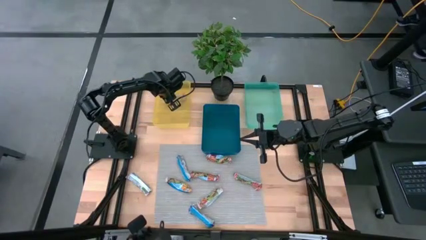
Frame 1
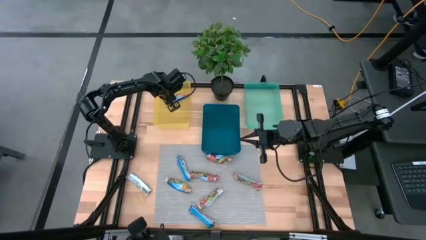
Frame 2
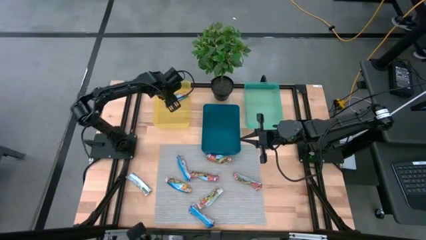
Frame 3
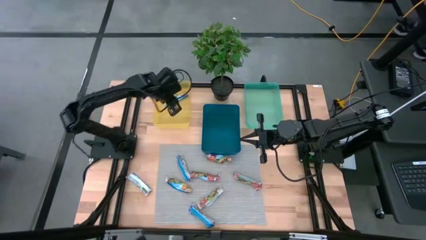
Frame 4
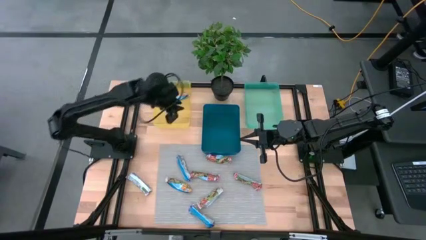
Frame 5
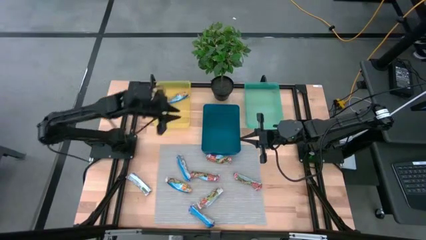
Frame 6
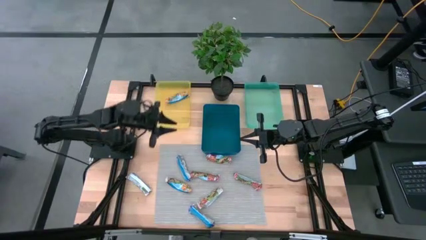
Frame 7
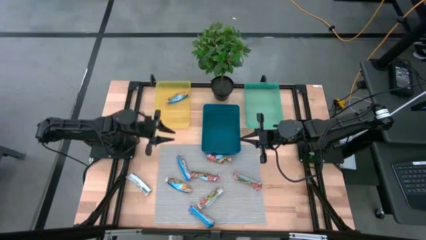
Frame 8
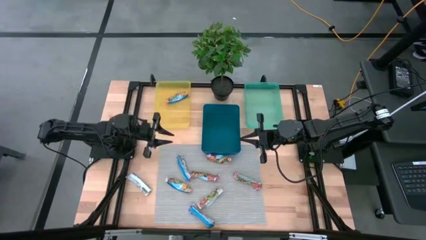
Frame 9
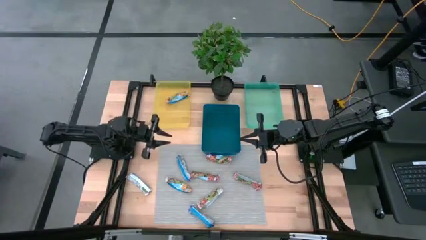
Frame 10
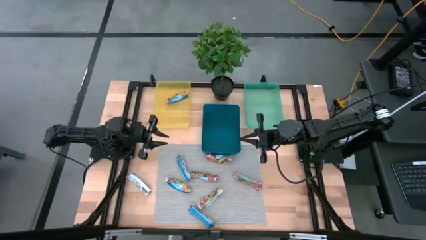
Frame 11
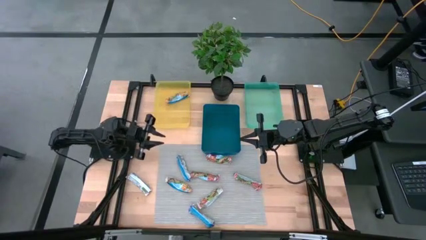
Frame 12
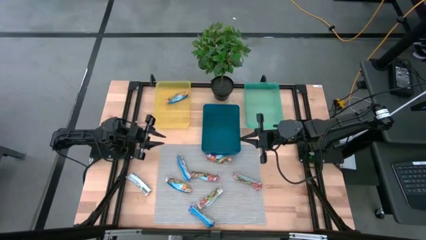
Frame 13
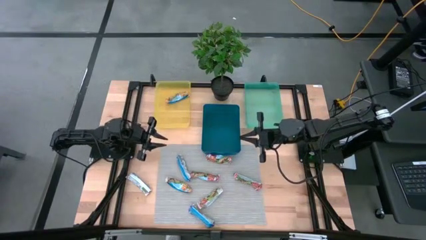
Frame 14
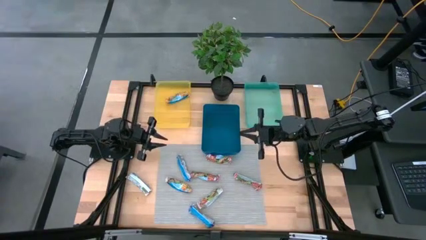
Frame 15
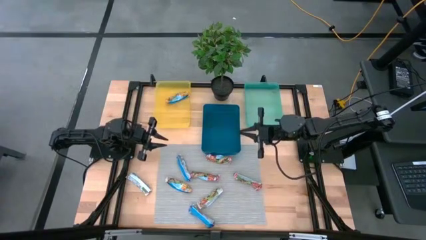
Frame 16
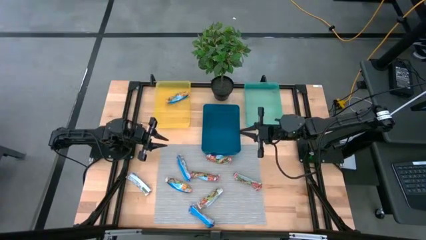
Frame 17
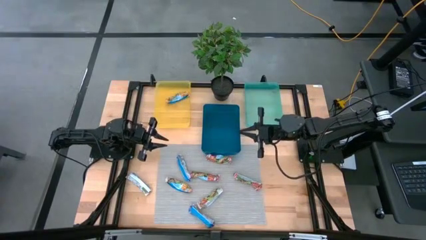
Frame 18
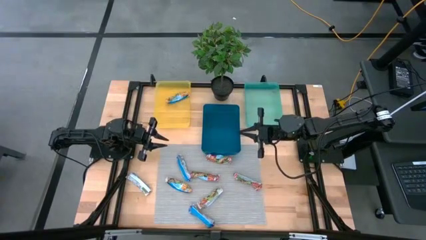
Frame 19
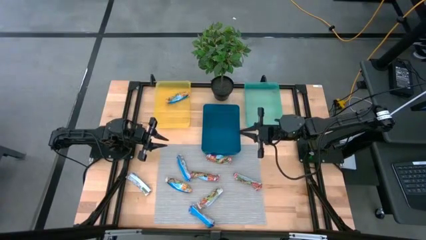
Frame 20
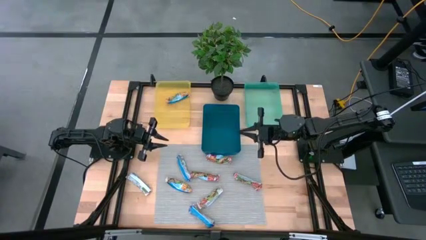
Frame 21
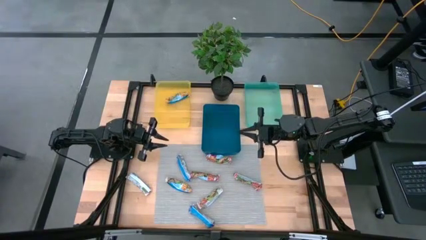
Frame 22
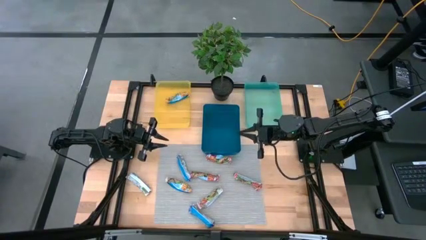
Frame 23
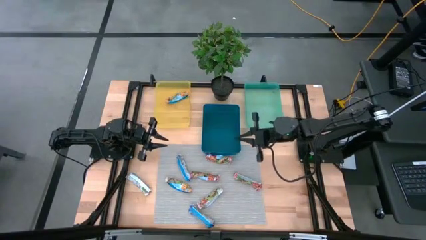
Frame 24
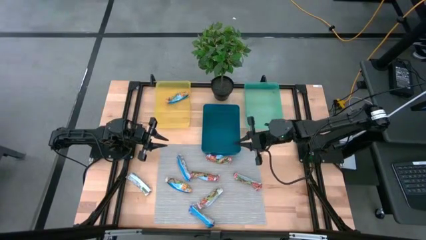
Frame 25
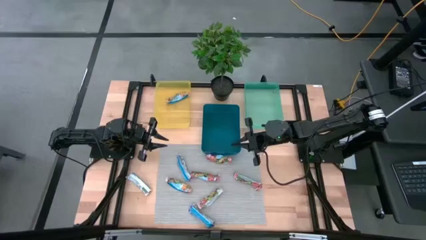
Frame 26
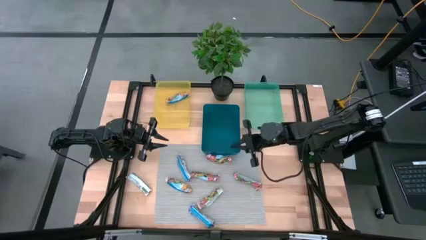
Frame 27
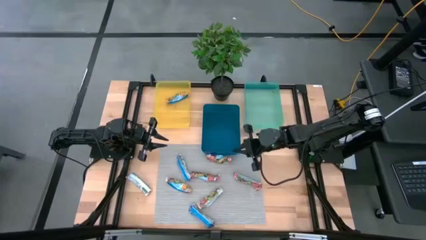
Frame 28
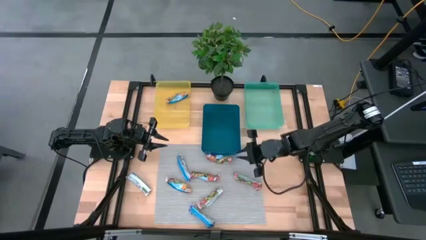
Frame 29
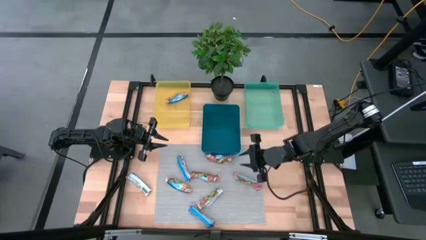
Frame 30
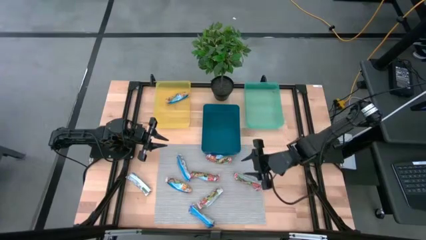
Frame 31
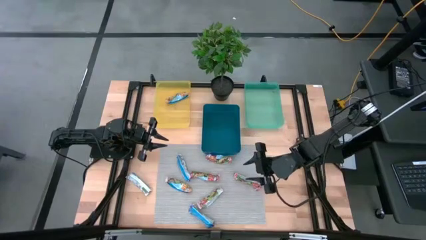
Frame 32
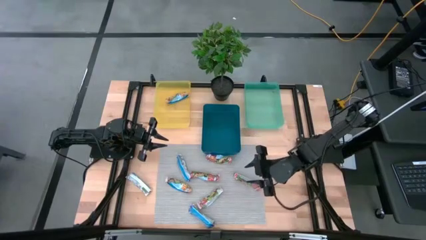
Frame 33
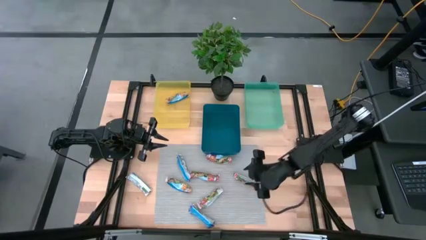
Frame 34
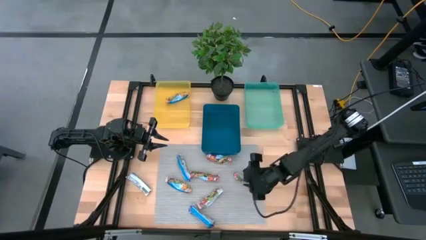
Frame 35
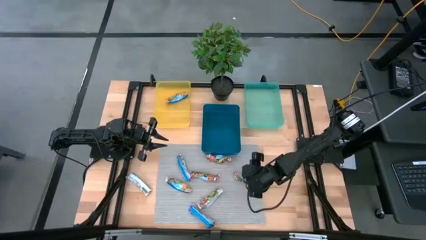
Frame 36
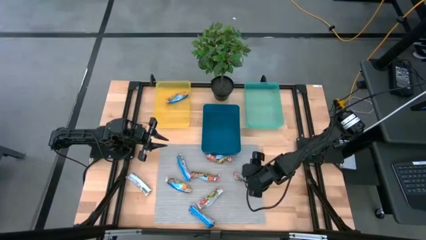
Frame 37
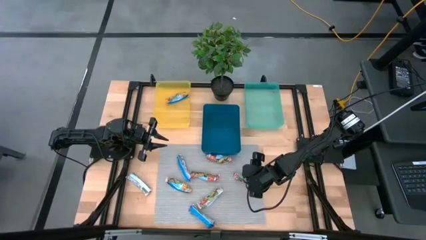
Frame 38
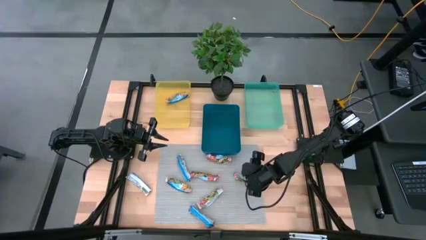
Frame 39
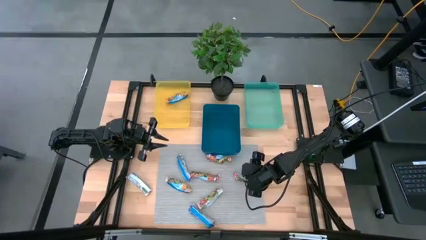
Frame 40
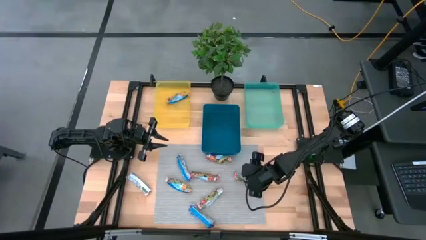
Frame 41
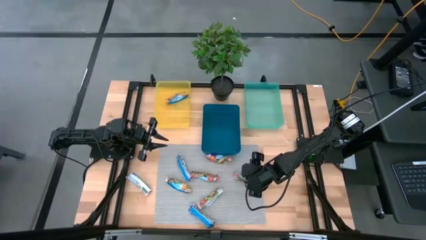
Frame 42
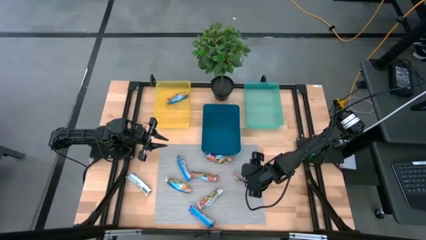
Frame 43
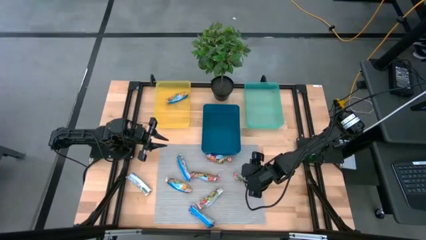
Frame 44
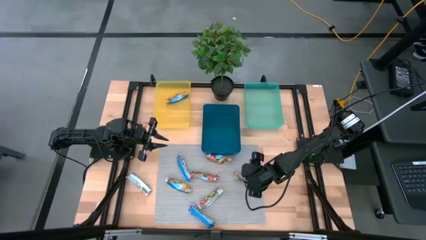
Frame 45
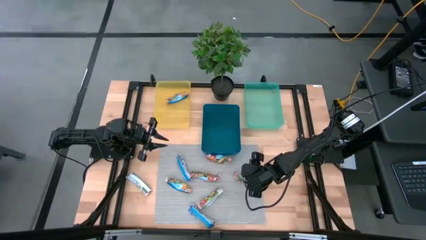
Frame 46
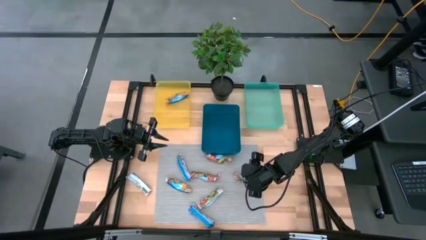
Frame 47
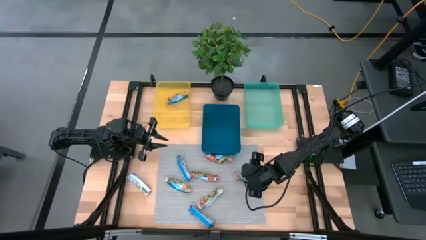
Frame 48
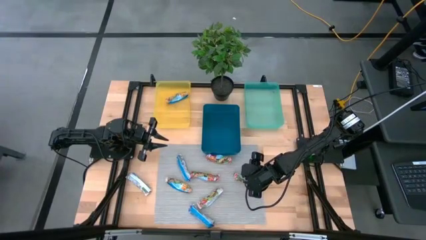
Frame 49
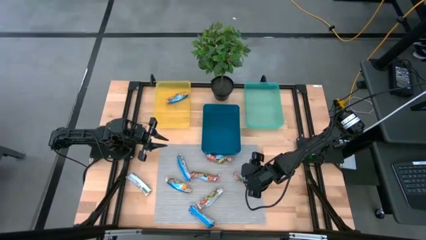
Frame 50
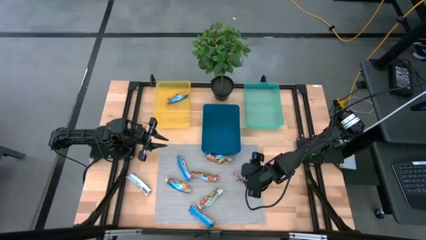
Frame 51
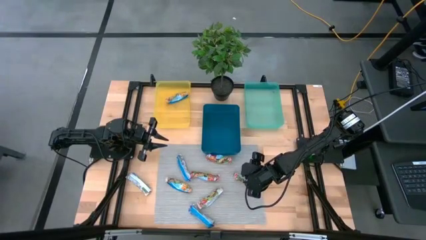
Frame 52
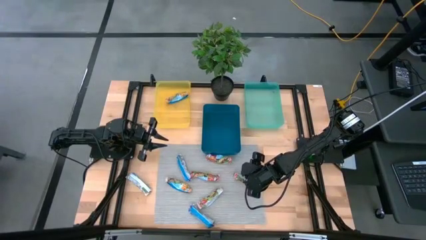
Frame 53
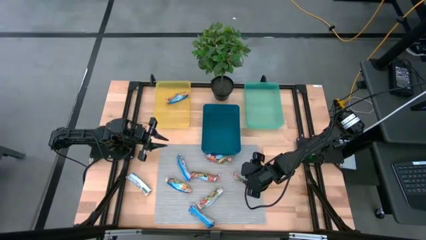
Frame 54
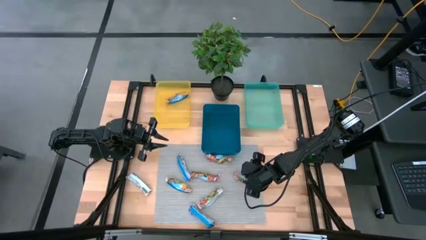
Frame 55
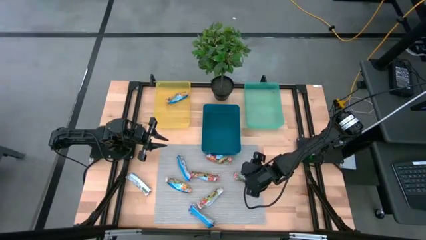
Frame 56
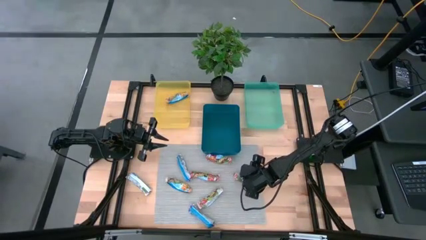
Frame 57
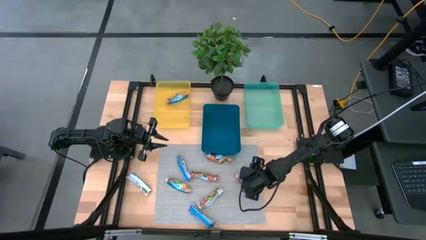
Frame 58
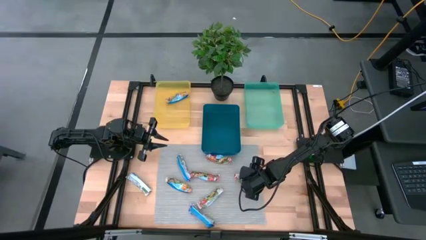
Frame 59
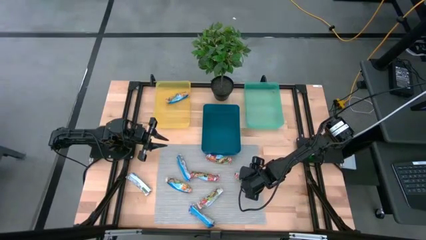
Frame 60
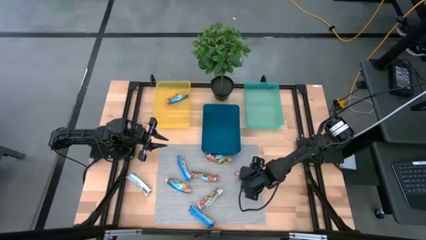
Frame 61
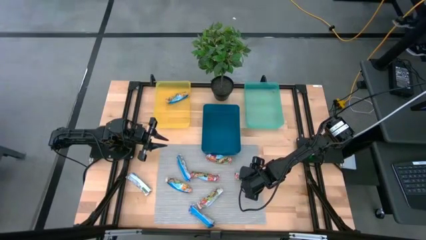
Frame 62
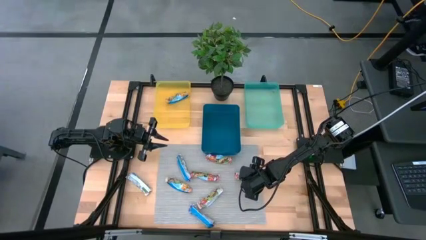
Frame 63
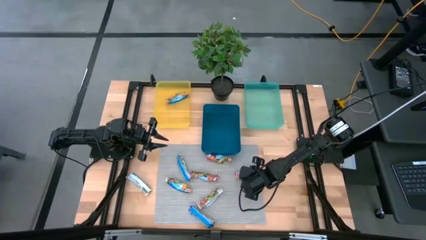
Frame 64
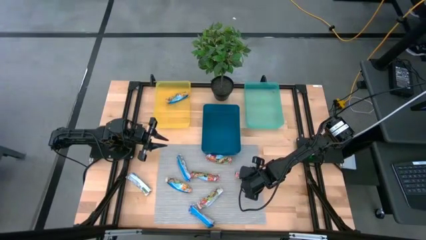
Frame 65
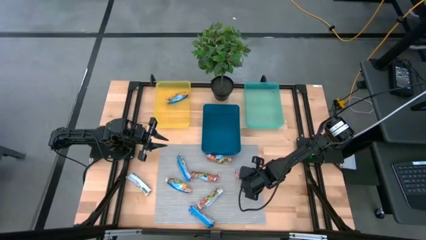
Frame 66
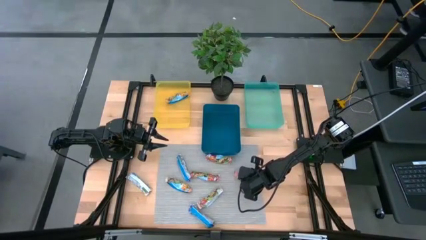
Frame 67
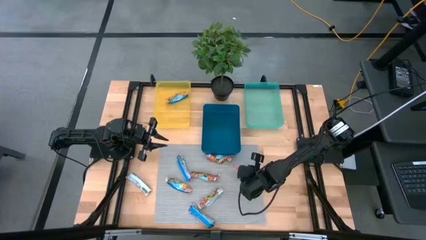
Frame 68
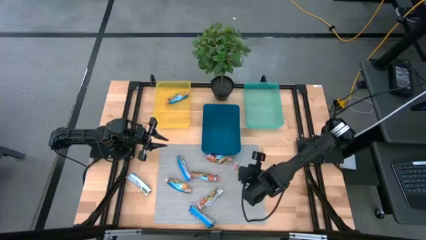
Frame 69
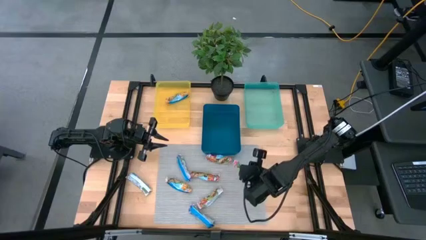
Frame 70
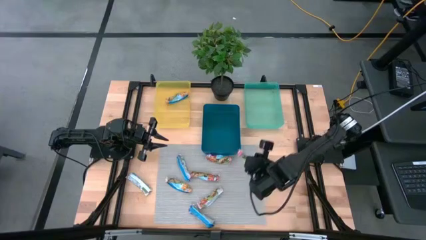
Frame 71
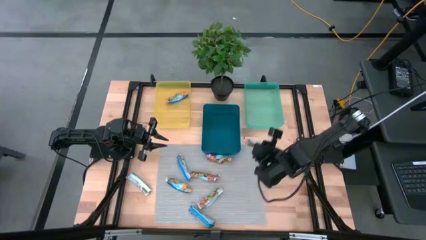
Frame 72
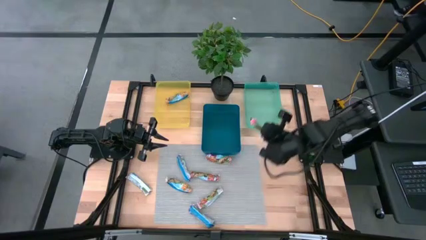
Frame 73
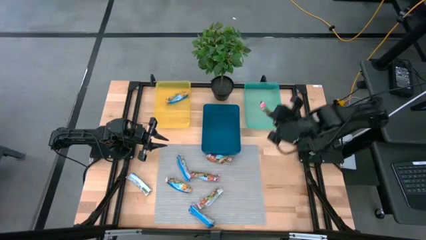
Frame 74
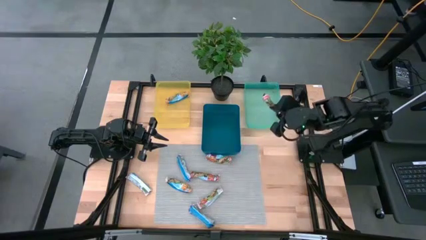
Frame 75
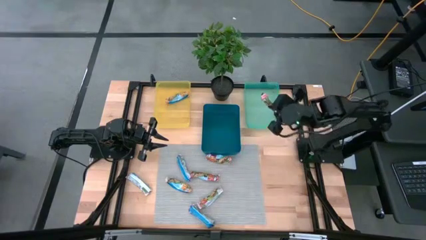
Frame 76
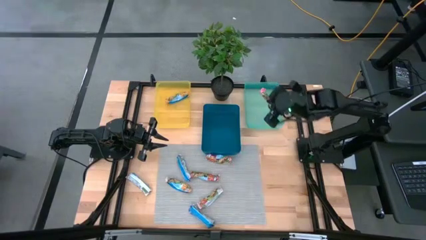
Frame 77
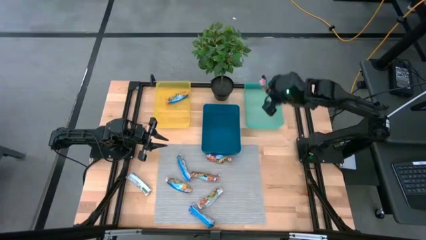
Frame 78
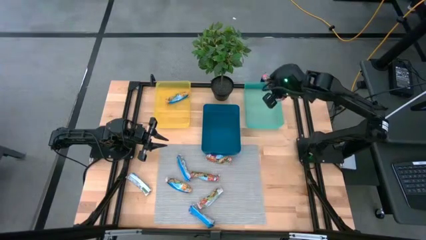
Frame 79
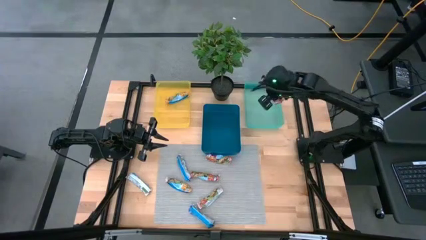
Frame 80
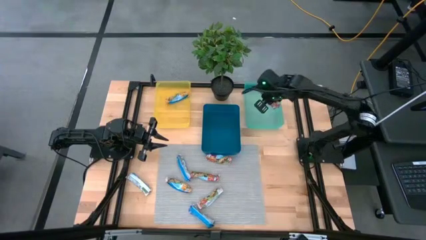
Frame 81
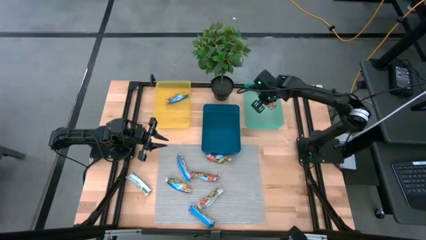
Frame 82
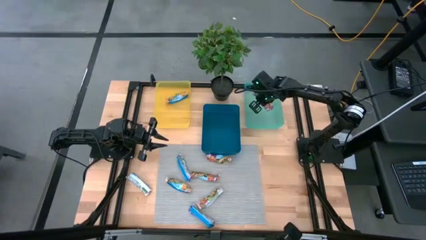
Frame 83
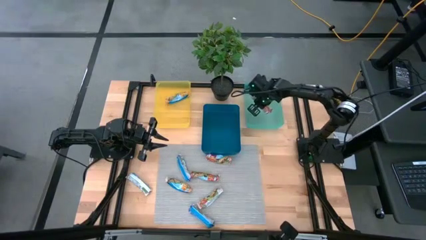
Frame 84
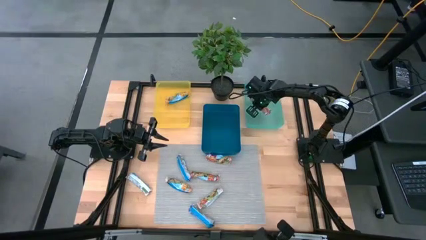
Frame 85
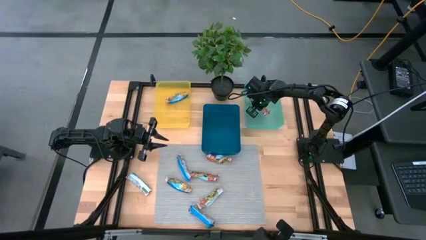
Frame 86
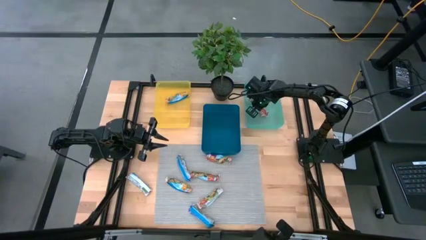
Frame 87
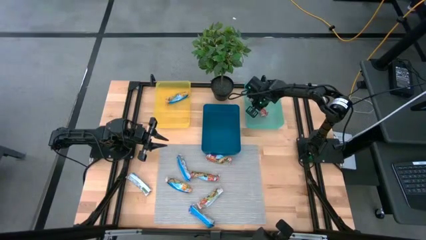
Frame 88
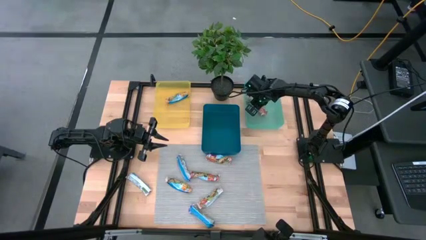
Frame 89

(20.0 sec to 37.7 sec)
Task: Pick and place Granola Bars by type
Put the red granola bar into the green bin
